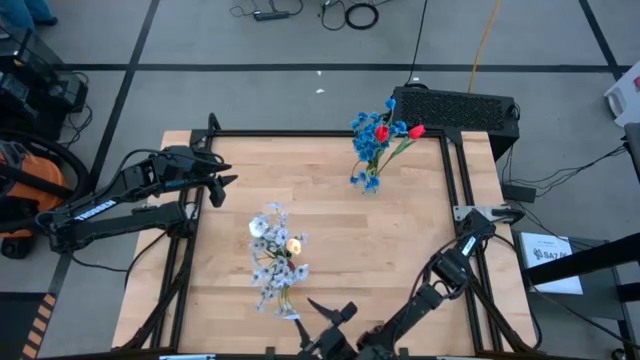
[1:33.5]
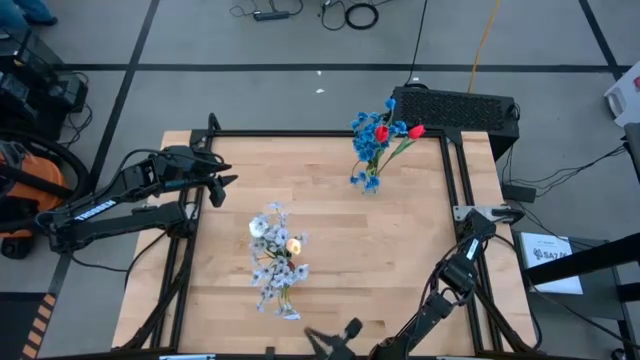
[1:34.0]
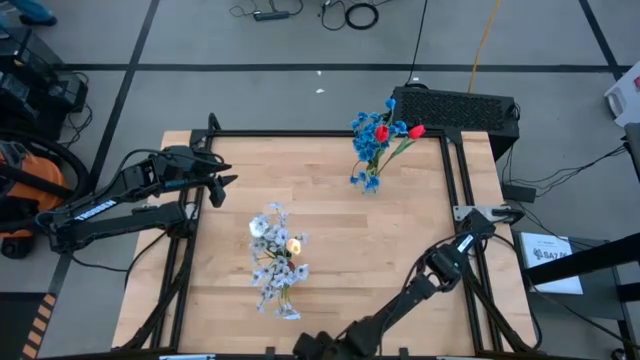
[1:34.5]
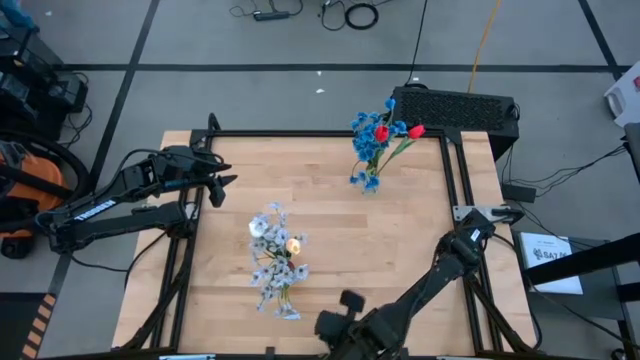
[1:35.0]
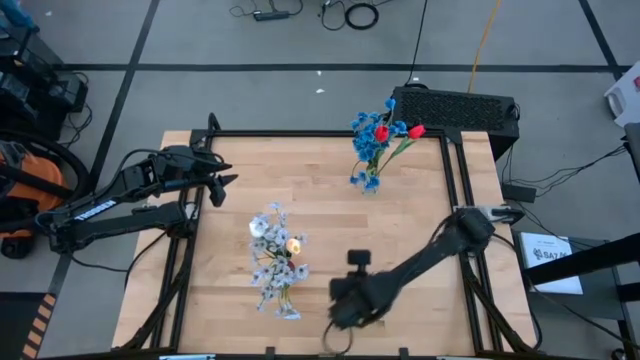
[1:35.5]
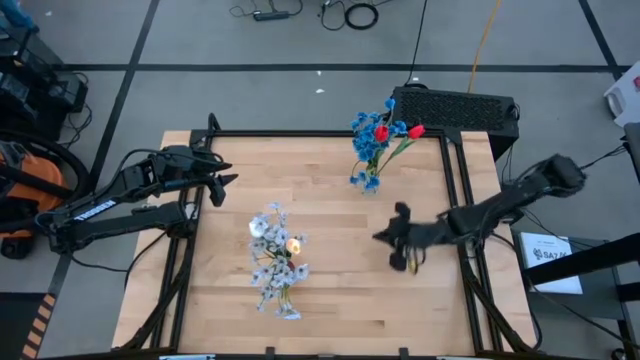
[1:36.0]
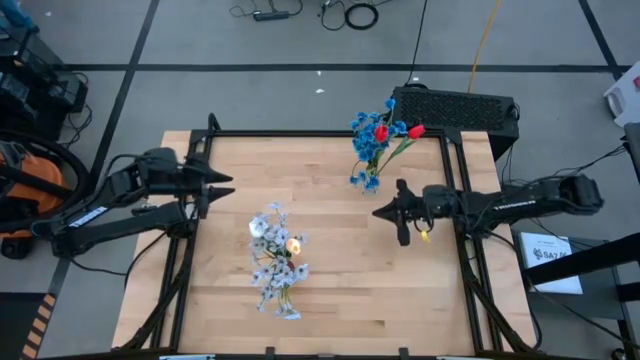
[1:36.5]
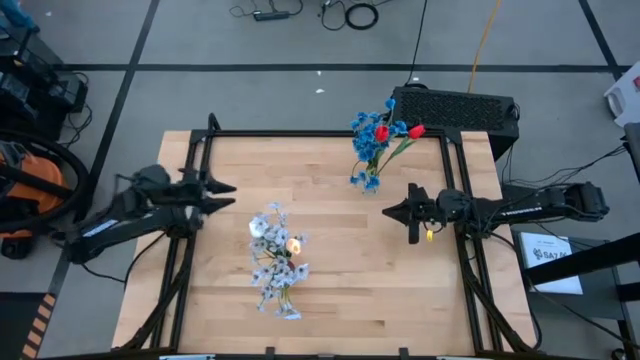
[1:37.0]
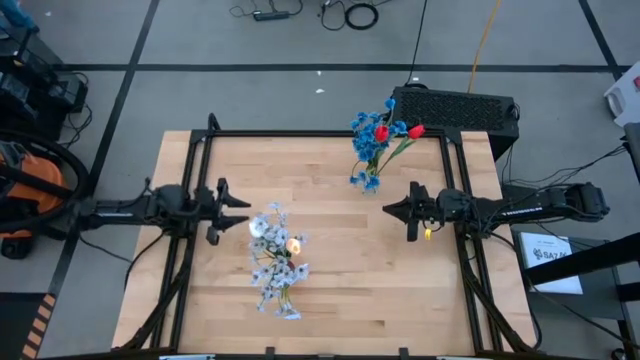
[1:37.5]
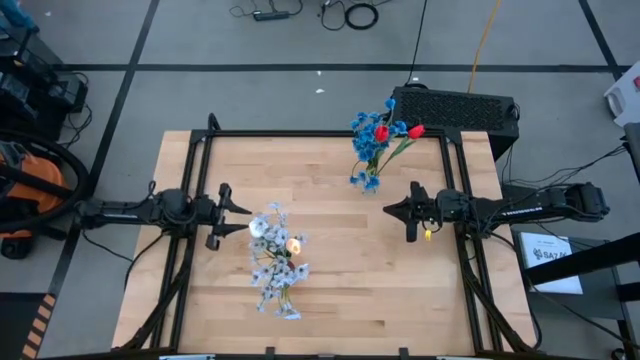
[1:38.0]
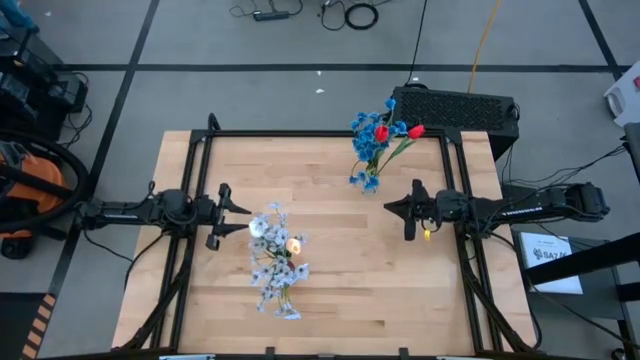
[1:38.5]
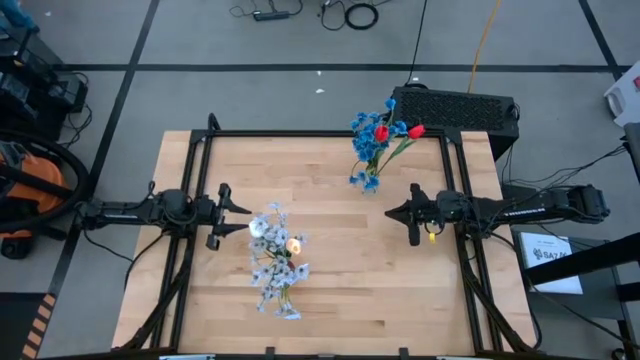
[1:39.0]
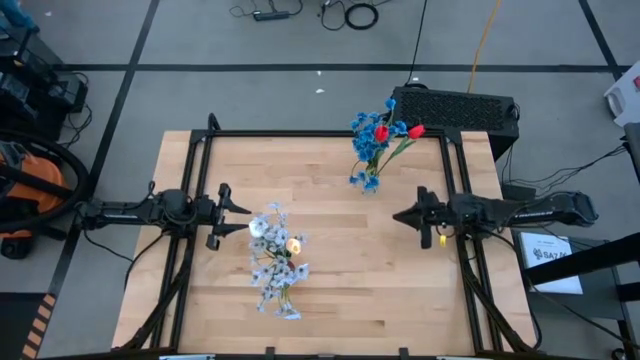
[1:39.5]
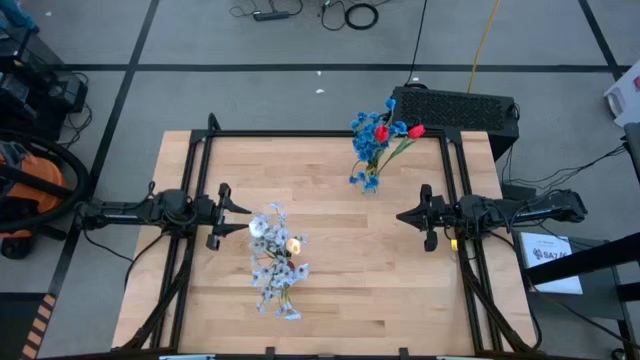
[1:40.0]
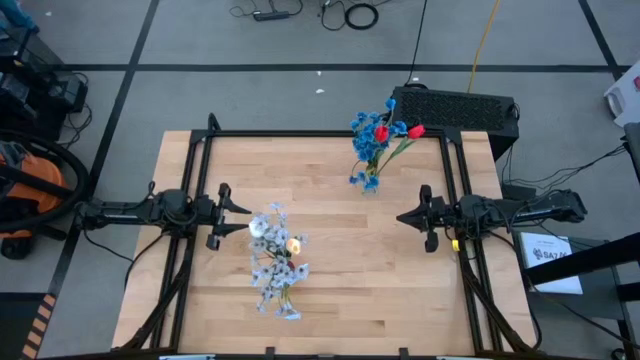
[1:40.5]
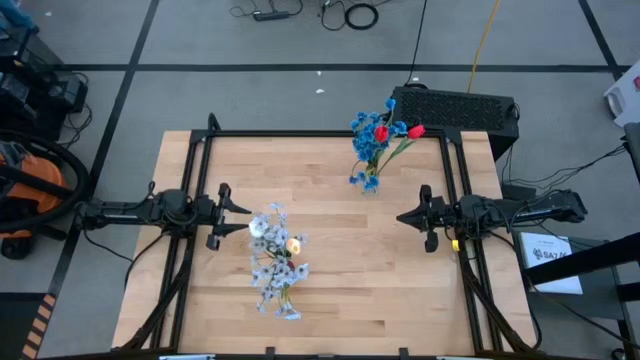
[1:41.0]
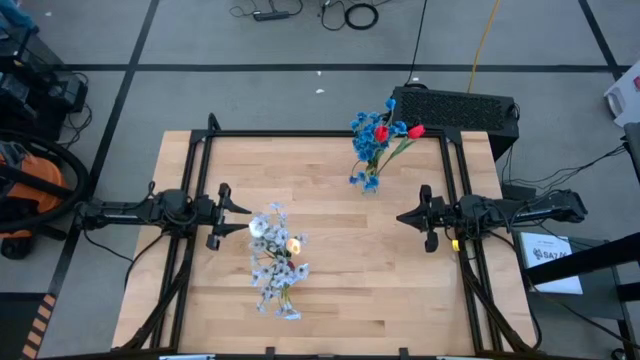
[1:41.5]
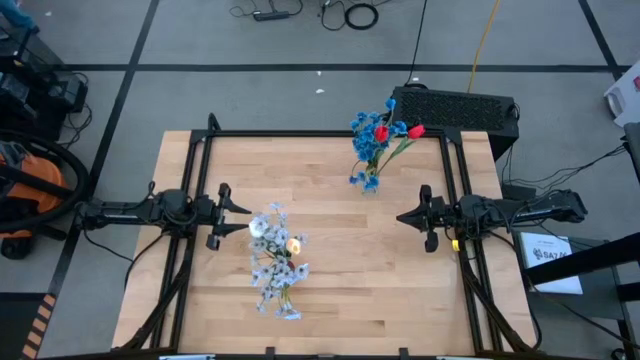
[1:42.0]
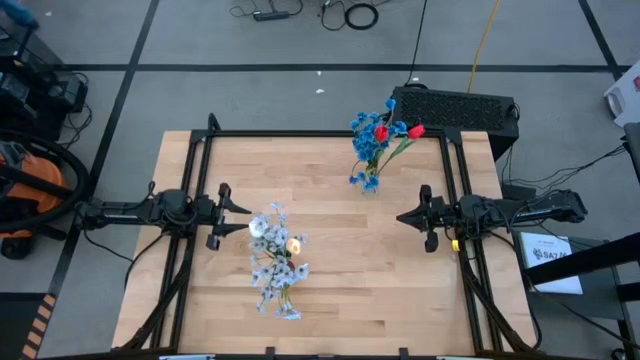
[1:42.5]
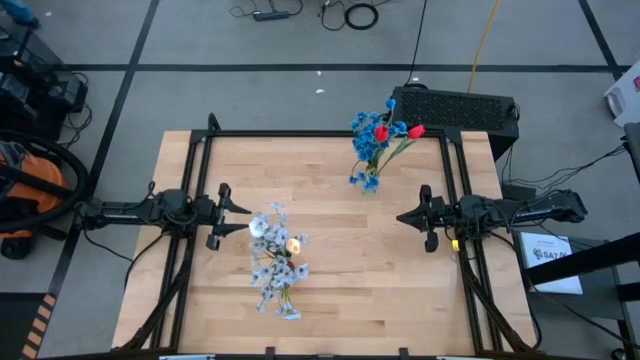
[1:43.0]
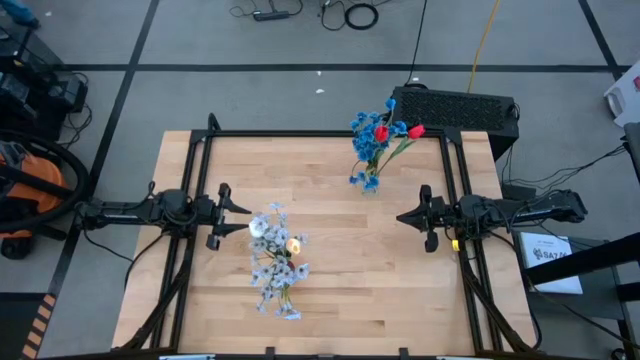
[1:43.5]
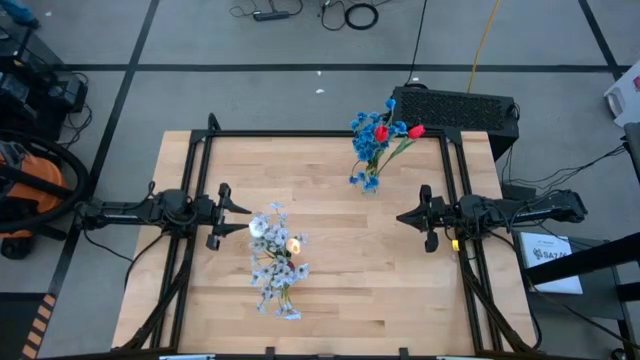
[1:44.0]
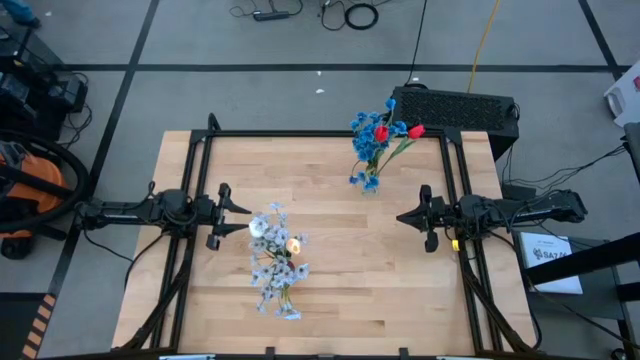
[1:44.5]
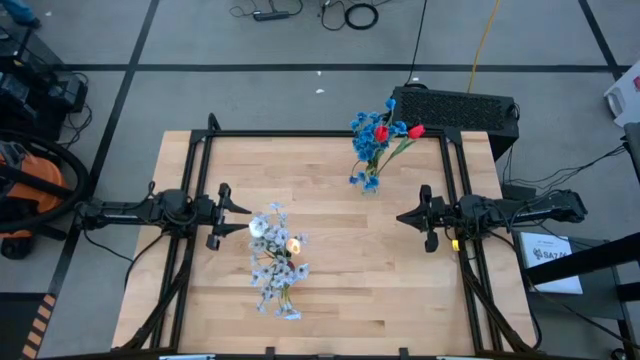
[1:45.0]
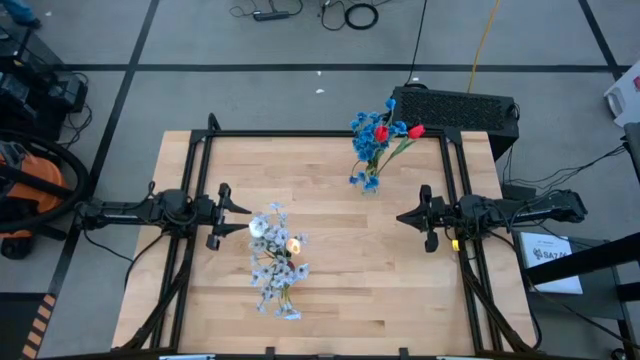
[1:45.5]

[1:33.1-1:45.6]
Task: Sort flowers into vase by color
Return to Home Position
